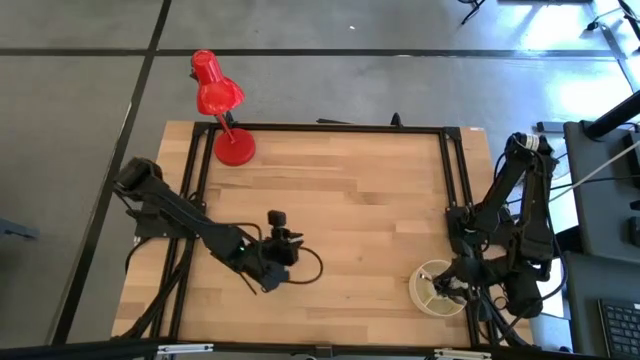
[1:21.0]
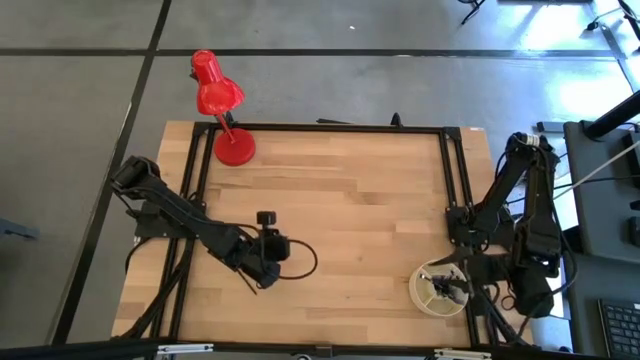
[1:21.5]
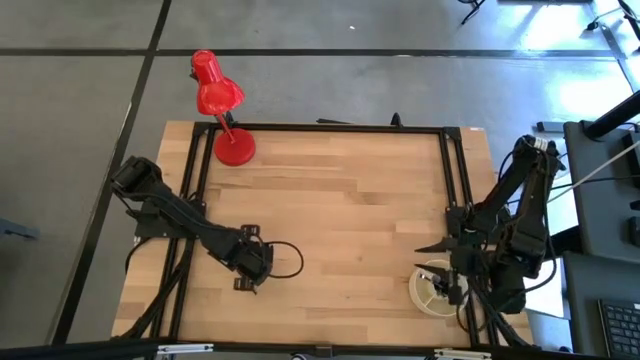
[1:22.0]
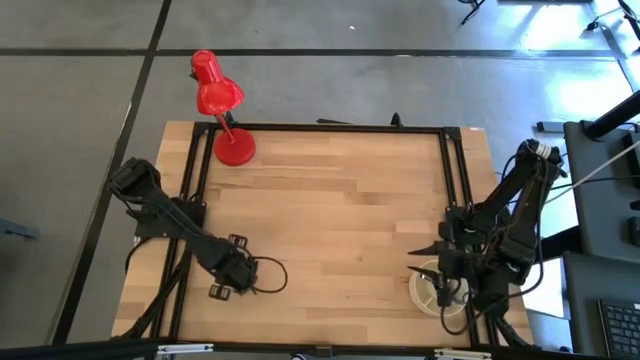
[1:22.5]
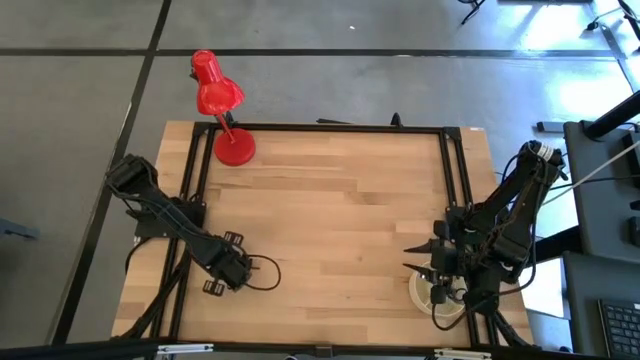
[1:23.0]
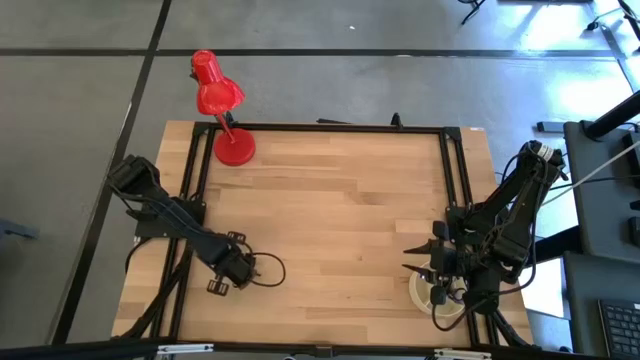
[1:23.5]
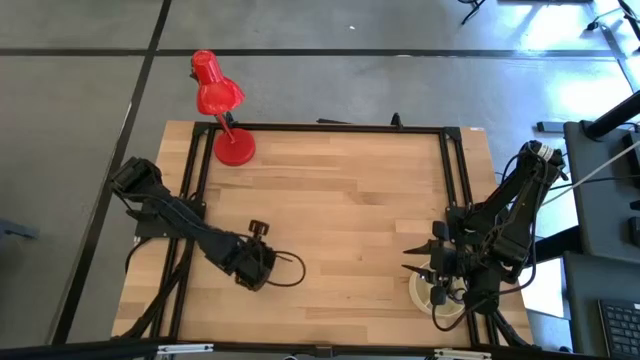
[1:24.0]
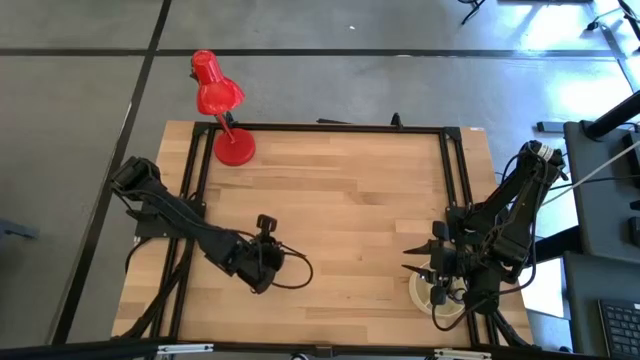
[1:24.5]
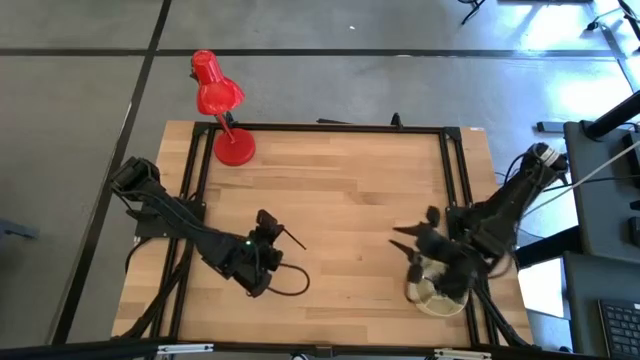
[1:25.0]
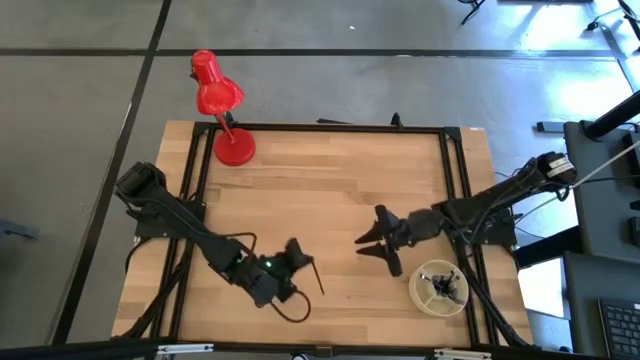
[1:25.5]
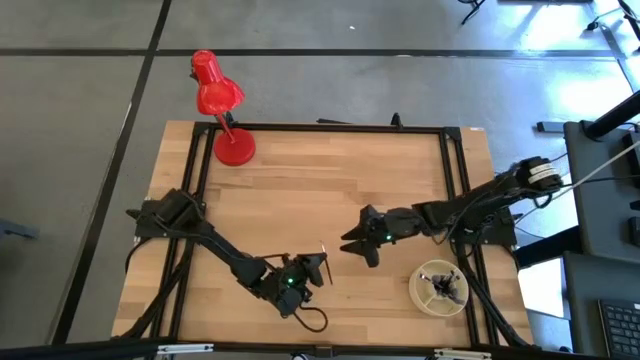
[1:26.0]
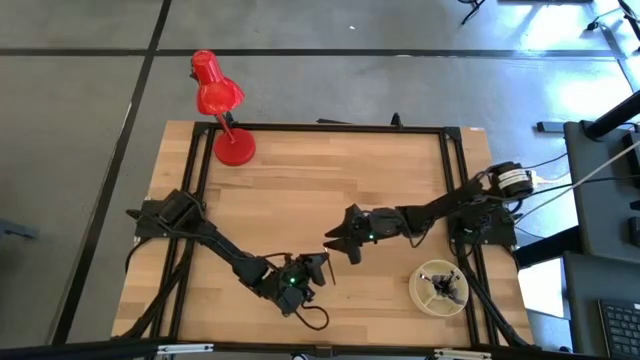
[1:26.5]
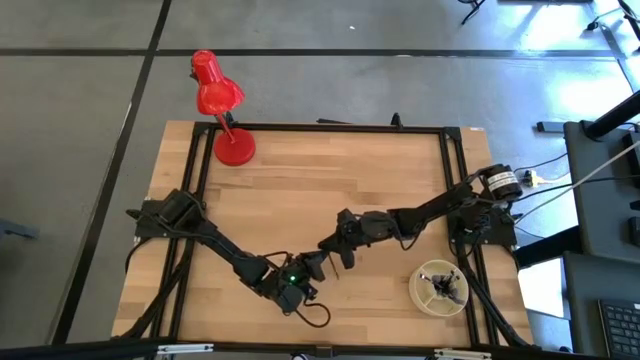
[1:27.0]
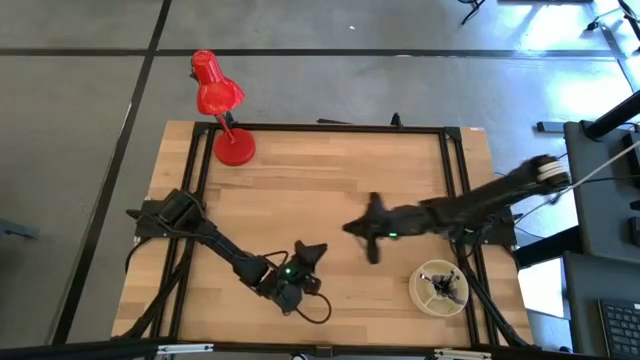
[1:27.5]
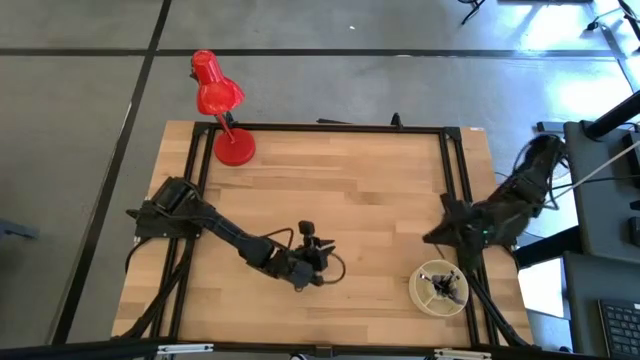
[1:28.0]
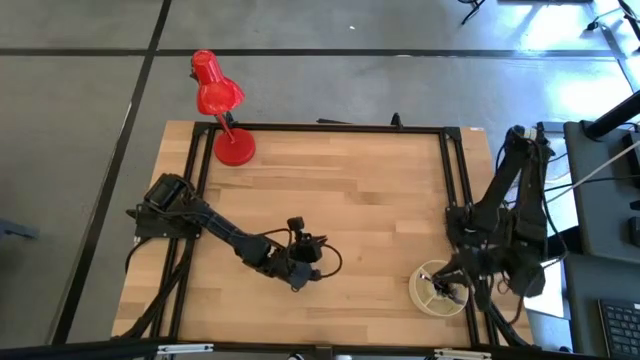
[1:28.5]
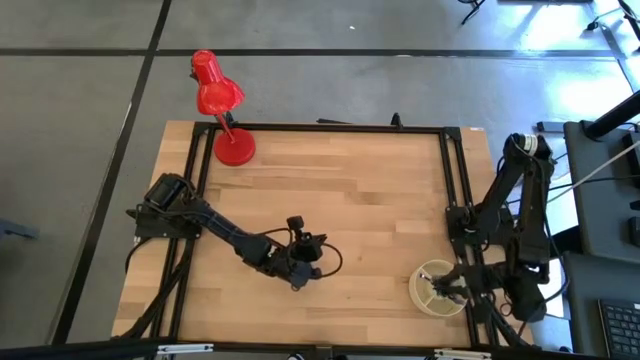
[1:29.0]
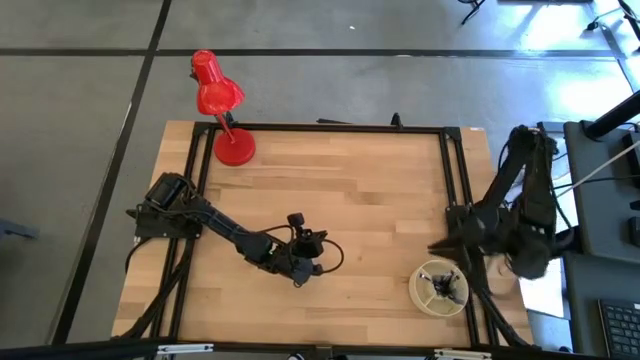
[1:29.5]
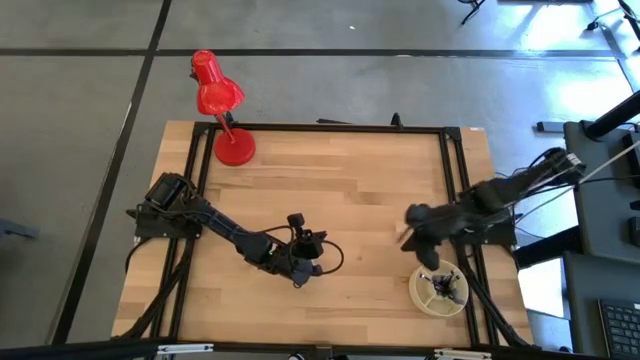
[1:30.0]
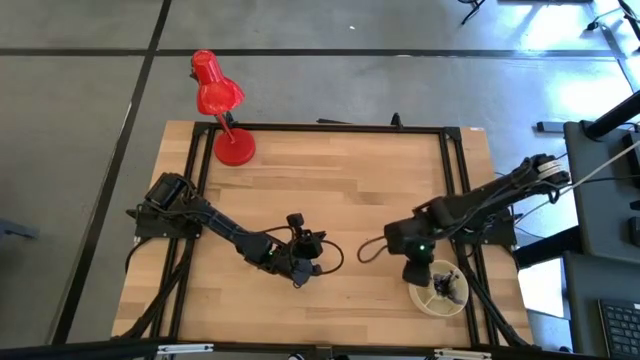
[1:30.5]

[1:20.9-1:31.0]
Task: Pick & Place Makeup Supplies
Put the makeup brush into the organizer

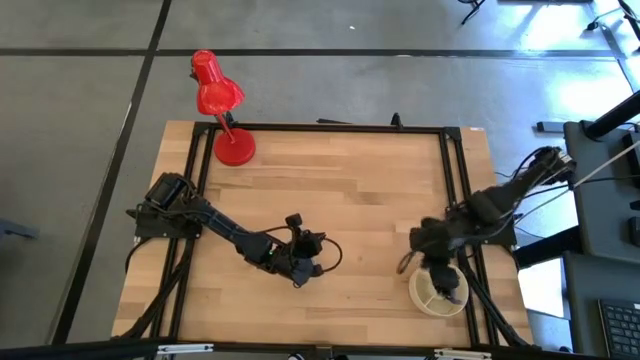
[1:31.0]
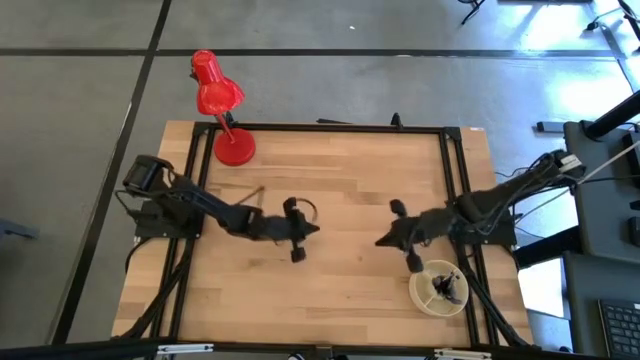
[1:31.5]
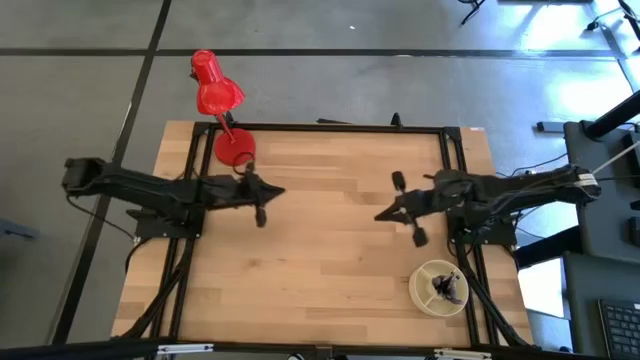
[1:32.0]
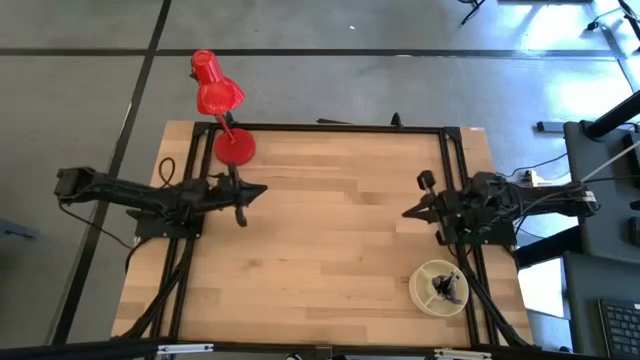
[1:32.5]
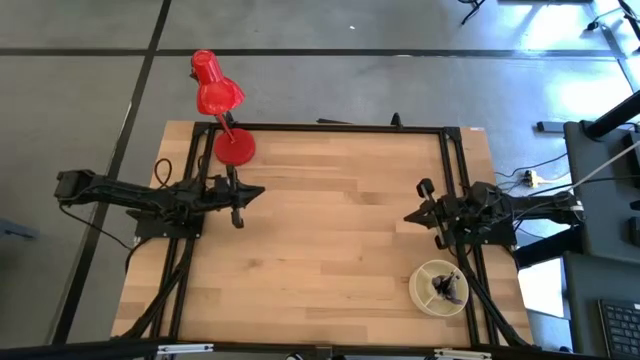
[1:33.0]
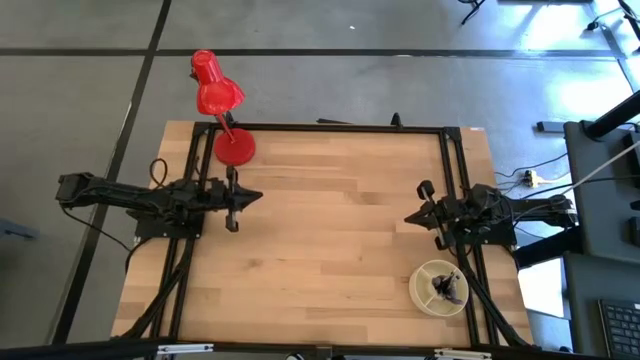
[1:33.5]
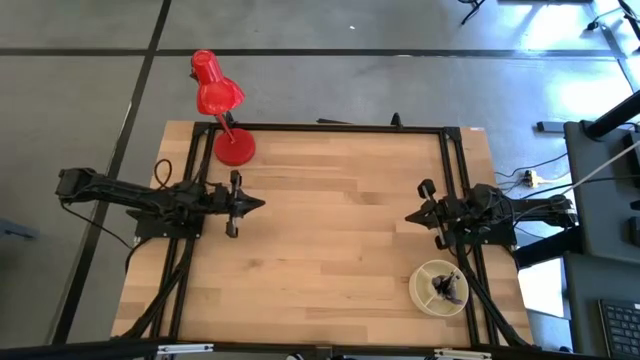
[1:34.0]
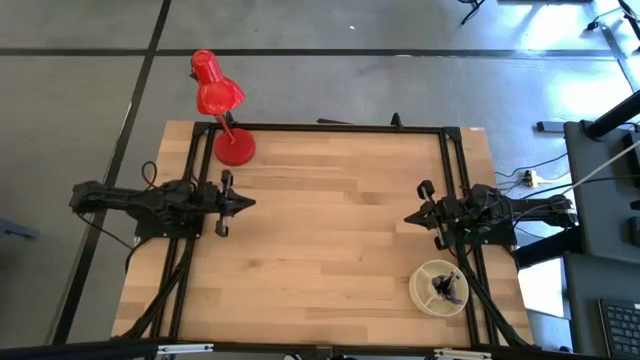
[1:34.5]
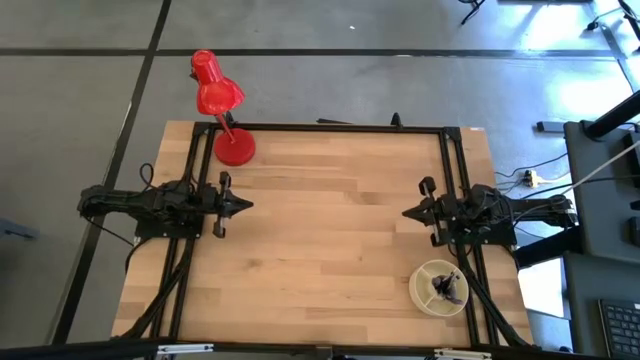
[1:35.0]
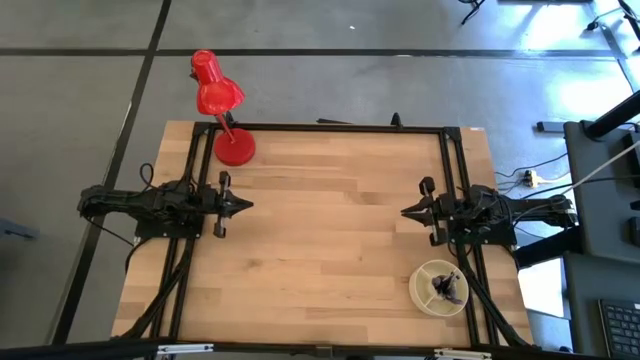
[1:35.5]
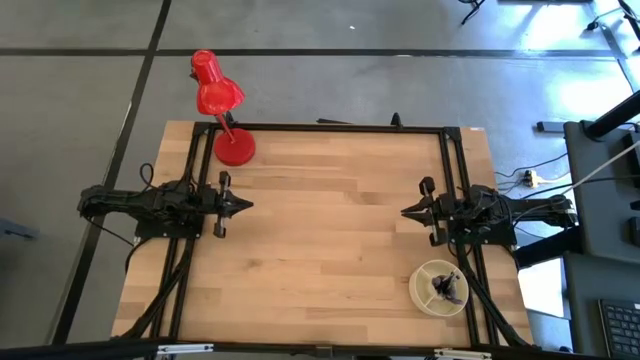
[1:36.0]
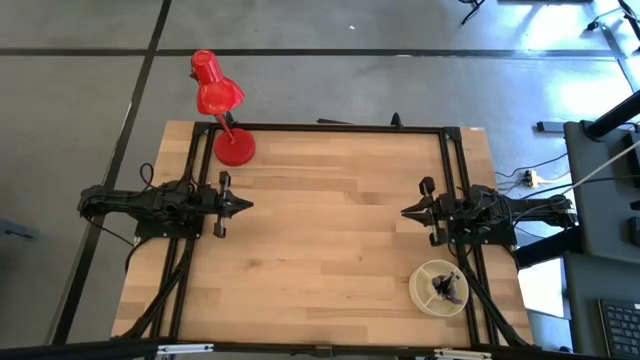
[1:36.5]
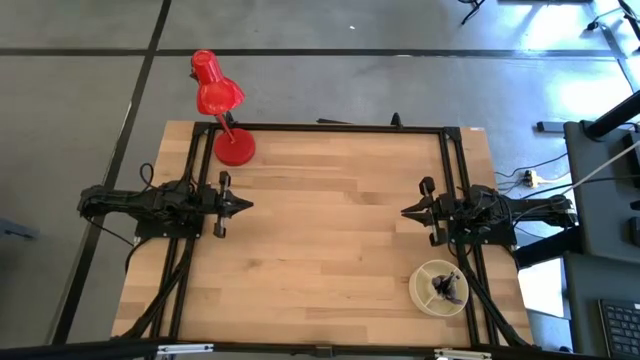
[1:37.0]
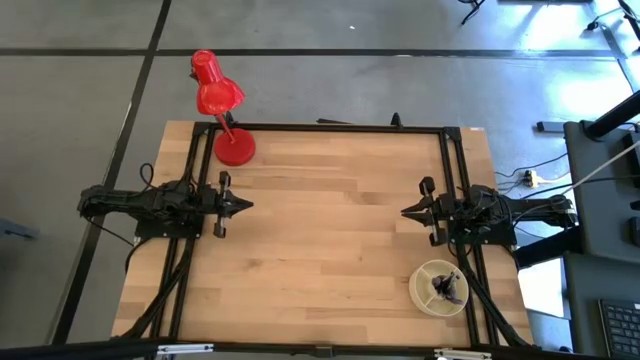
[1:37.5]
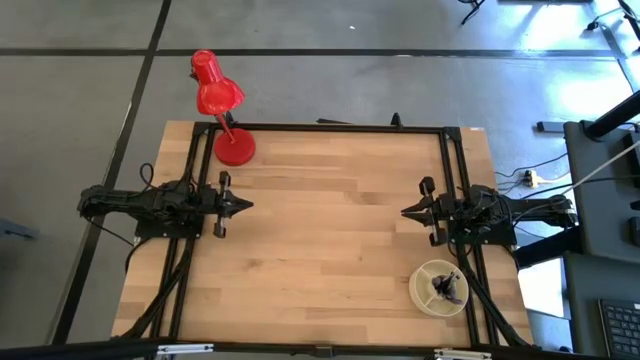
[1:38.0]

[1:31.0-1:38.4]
Return to Home Position

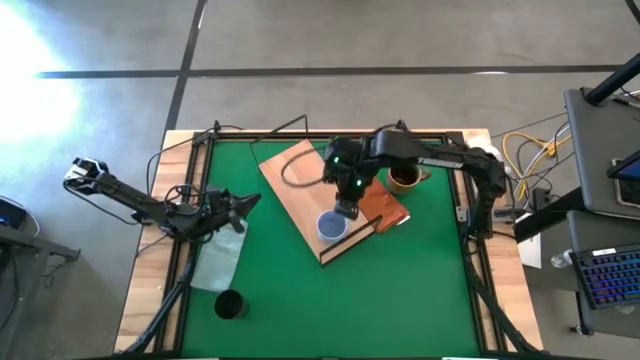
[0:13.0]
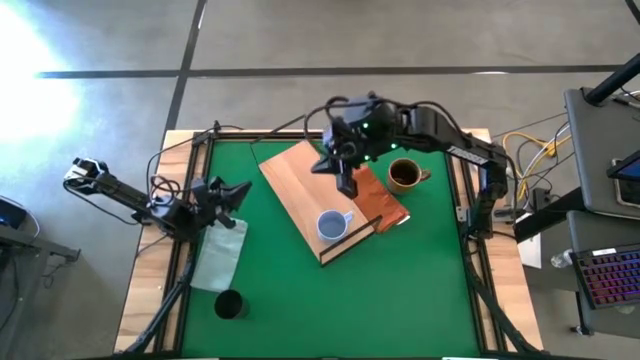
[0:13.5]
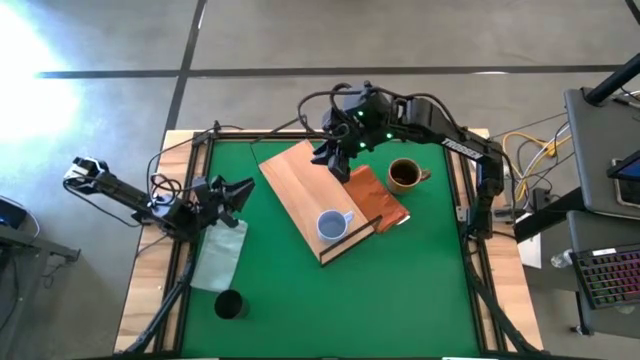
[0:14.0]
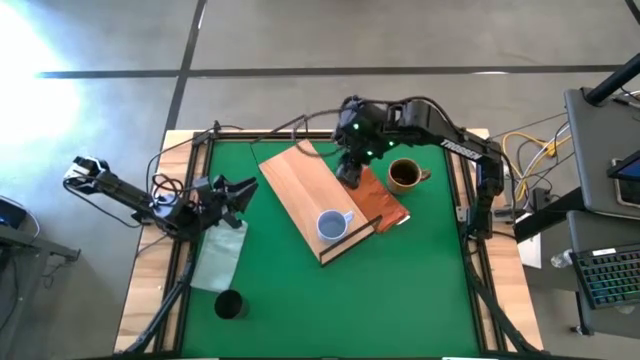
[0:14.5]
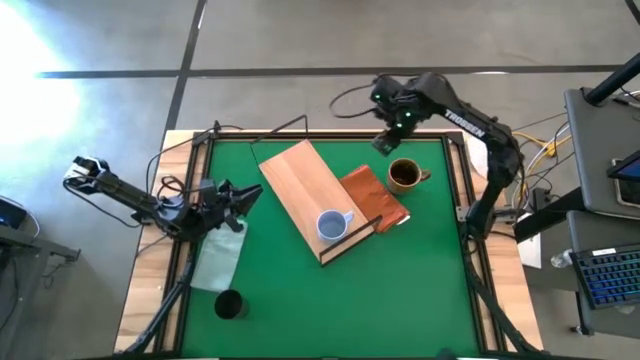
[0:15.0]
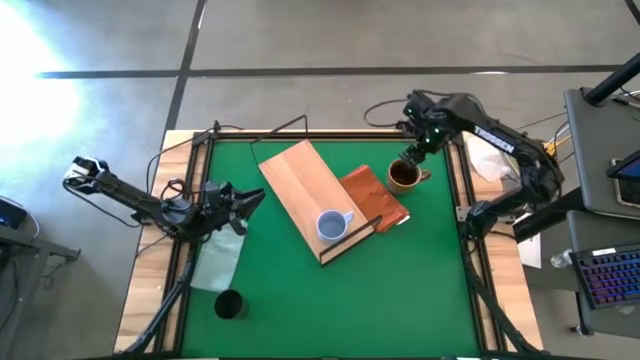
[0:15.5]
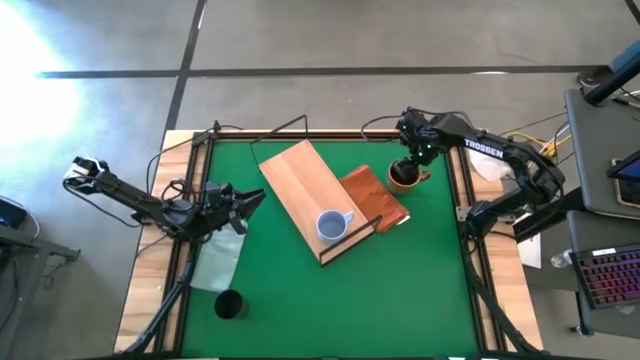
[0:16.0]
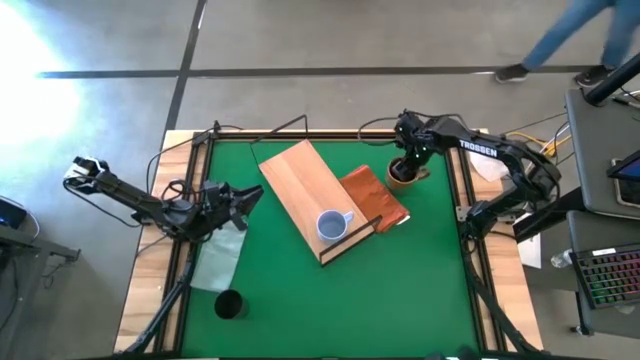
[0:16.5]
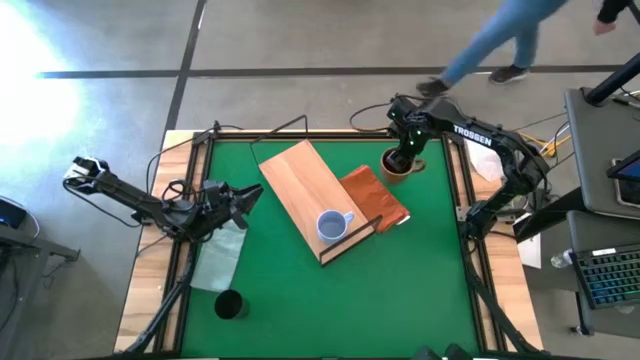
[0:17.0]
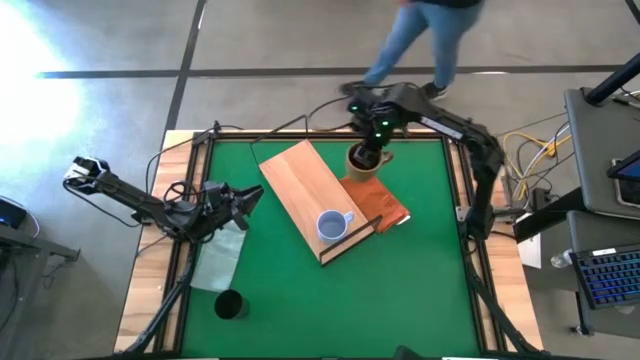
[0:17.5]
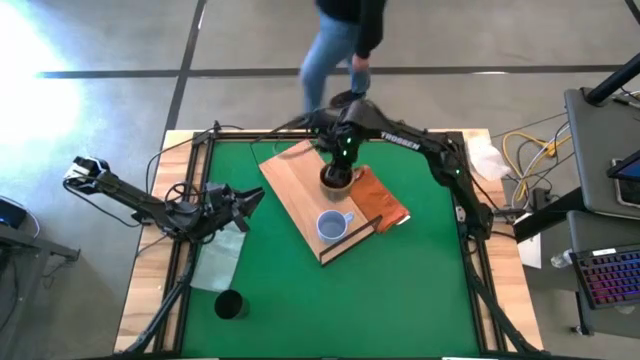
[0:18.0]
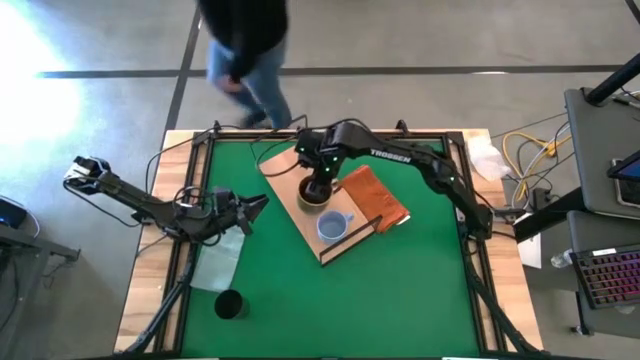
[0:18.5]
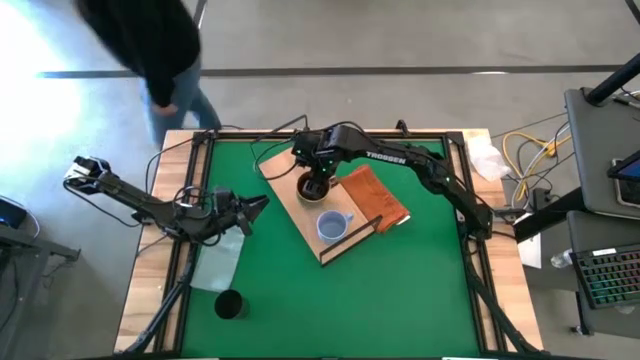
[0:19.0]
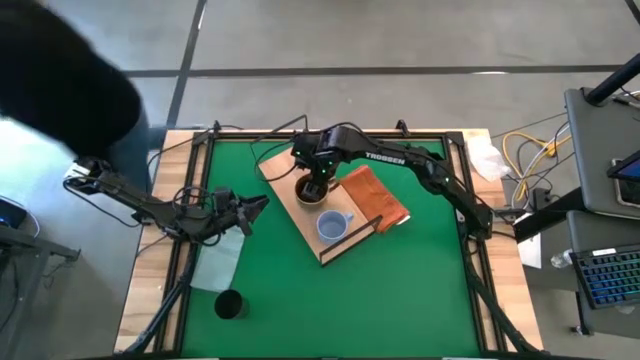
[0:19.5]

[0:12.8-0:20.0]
Task: Stack small to large cups/mugs on shelf
Put the green patterned mug on the shelf
